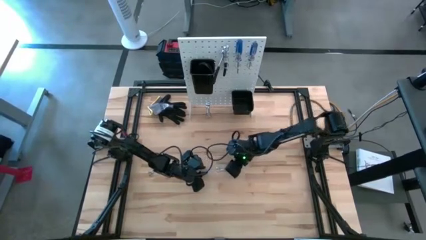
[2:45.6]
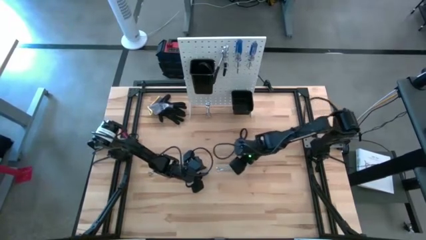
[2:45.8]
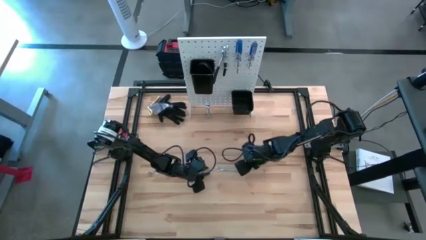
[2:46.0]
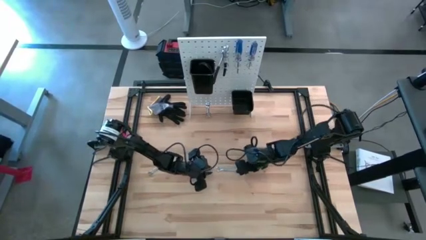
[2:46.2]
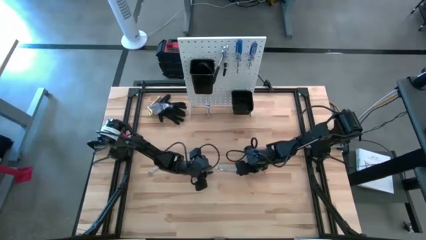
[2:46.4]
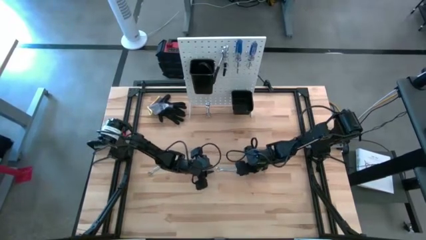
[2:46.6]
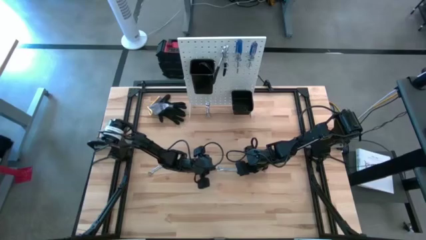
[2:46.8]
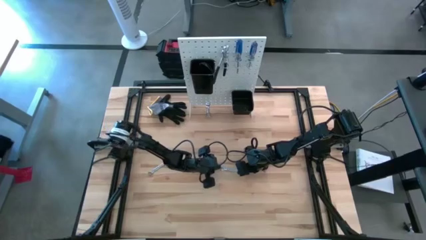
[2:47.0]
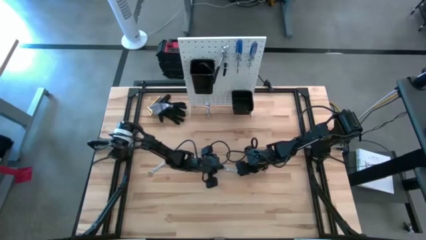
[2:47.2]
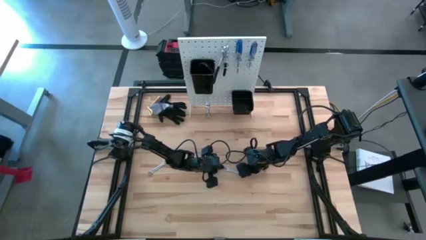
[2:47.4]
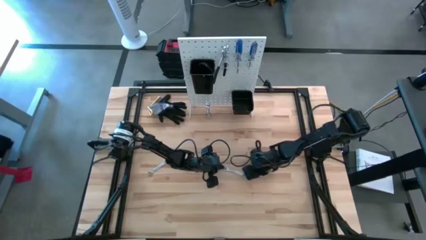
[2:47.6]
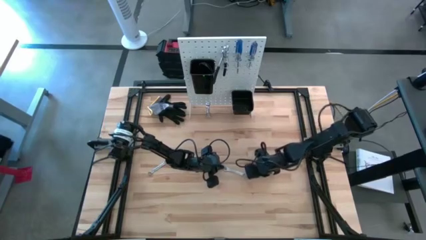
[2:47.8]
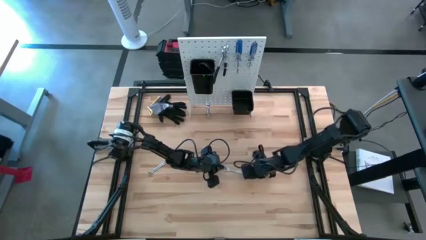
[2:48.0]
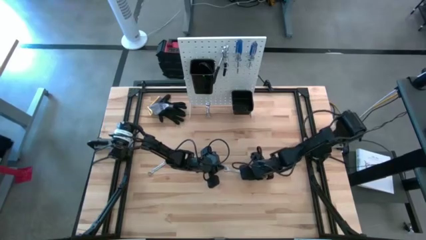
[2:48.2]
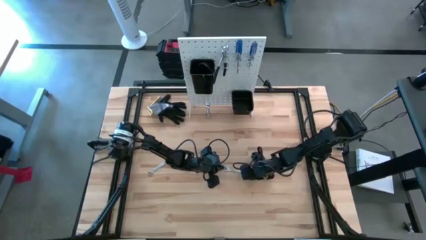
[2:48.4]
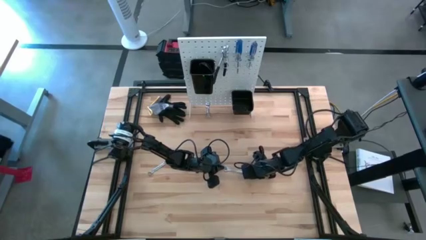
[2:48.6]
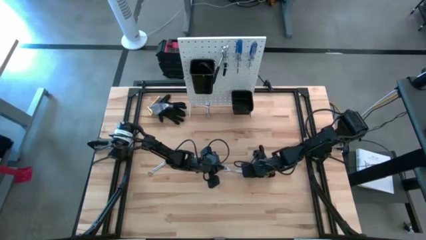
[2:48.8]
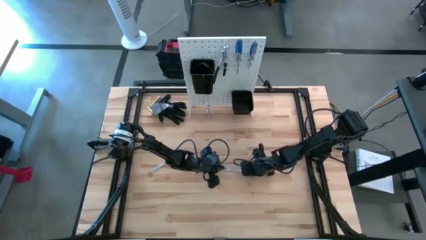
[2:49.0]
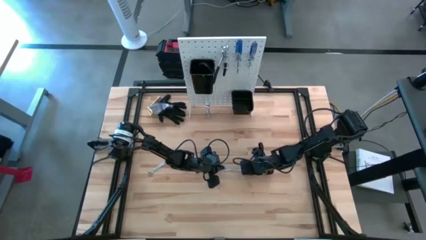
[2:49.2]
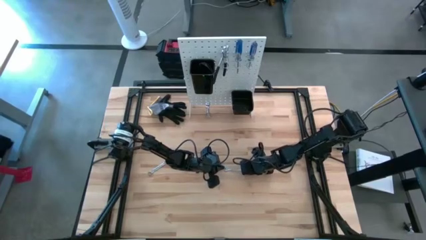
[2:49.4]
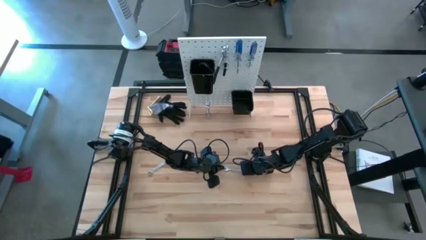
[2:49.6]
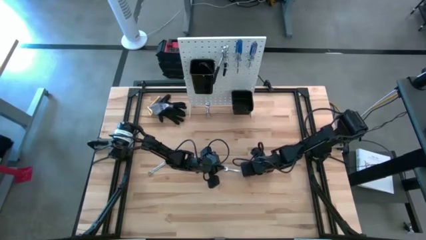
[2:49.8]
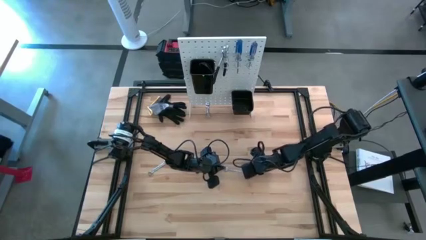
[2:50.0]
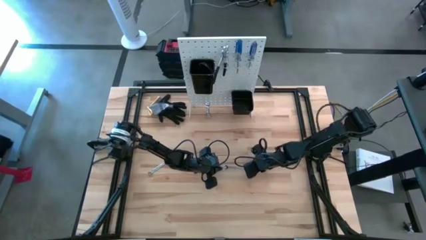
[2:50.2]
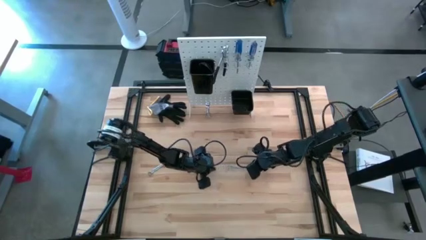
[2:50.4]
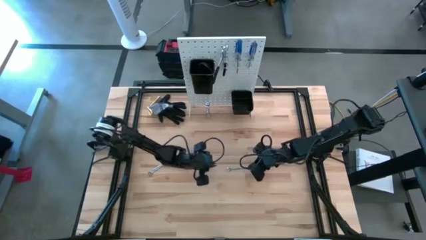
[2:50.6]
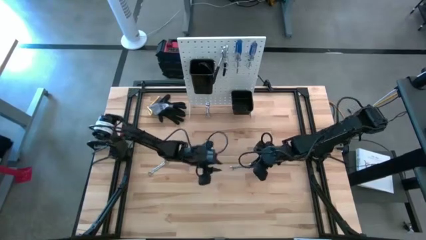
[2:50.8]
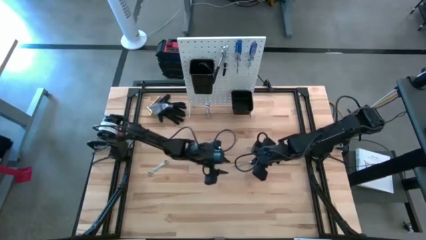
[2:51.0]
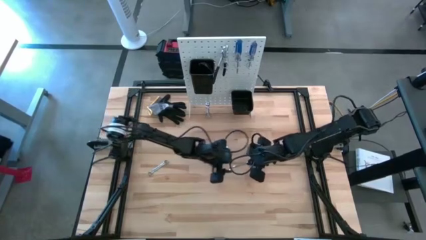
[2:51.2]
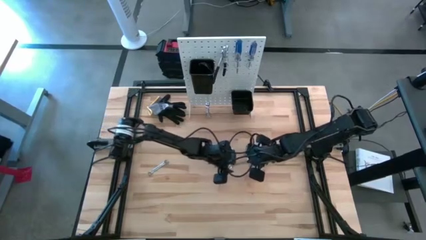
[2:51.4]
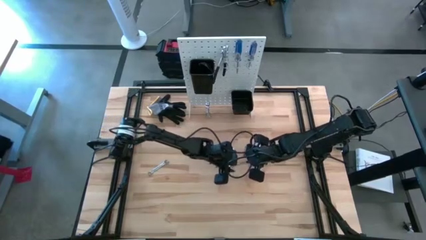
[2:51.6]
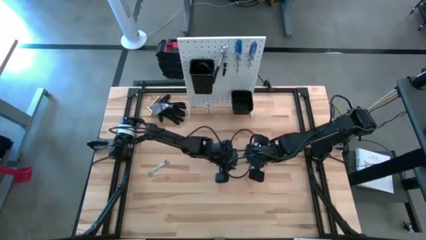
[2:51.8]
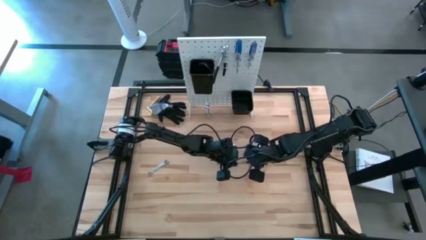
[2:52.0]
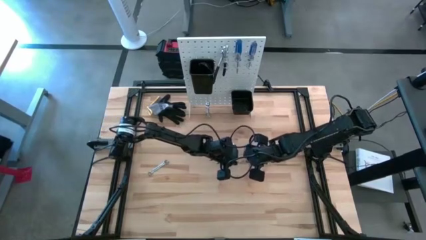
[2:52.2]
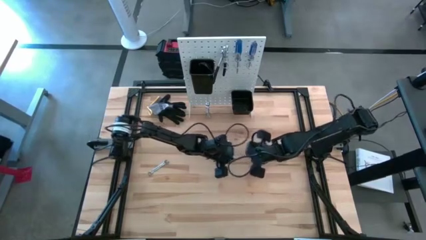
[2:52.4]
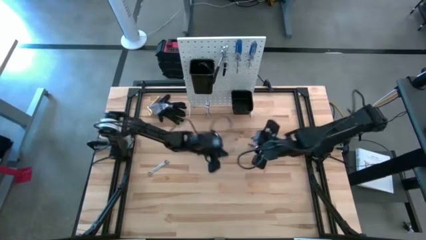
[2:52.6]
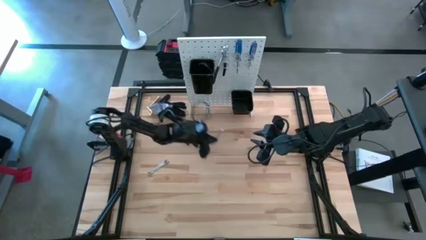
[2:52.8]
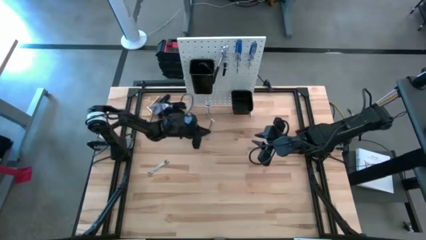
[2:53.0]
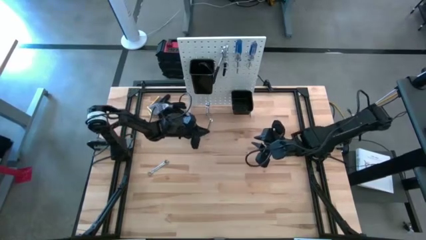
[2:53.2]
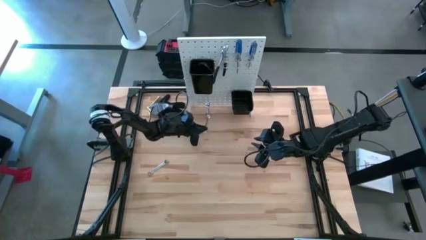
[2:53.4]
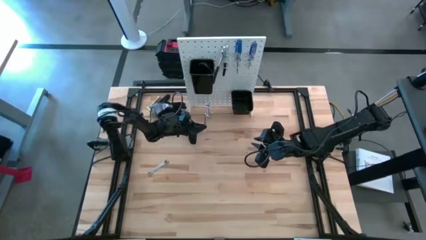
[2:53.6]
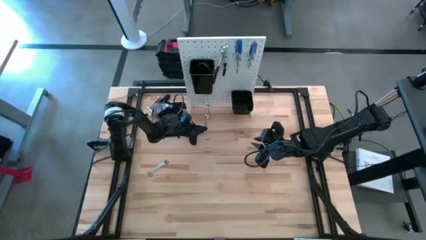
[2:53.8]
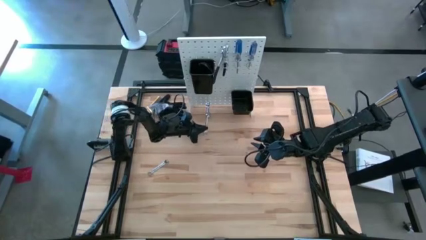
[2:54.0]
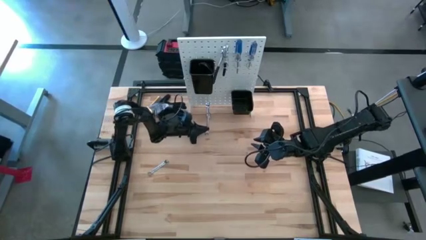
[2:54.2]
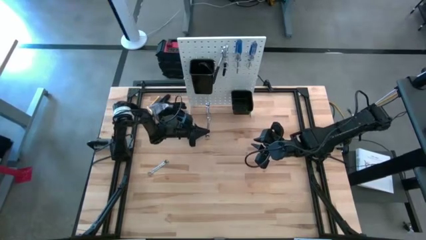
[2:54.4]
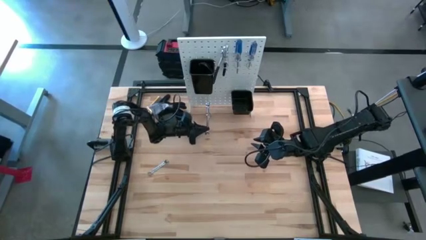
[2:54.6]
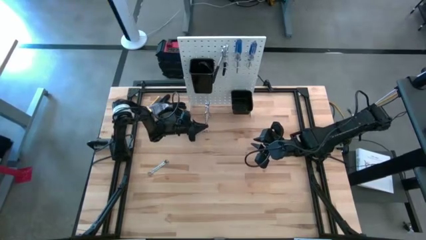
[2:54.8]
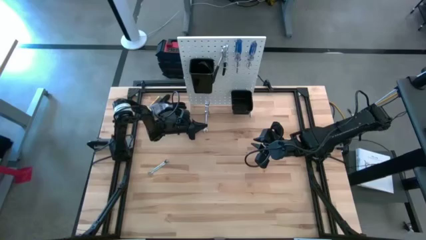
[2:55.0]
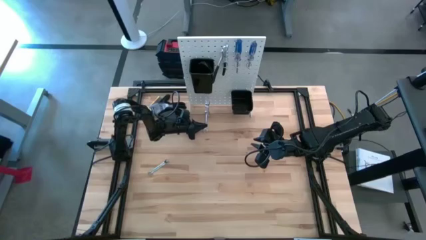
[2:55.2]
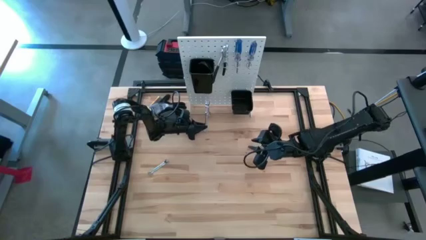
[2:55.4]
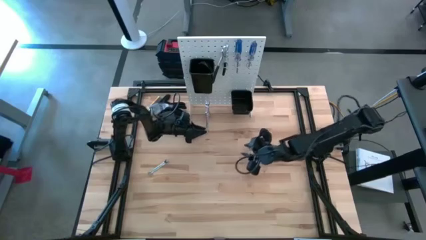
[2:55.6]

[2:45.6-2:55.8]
Task: Hang tools onto peg board
Hang the wrench on the peg board

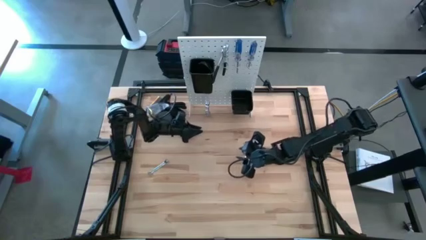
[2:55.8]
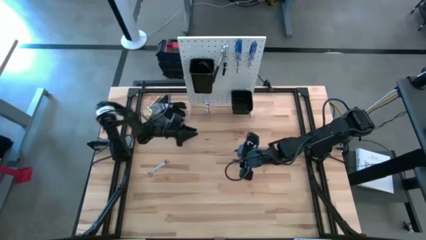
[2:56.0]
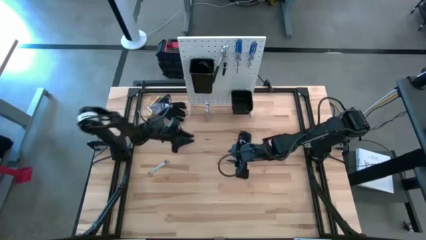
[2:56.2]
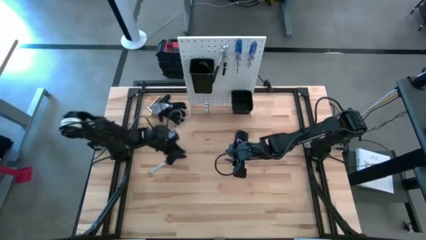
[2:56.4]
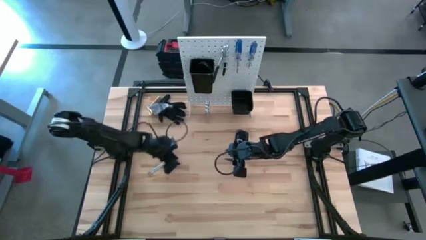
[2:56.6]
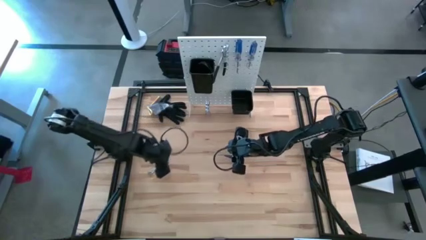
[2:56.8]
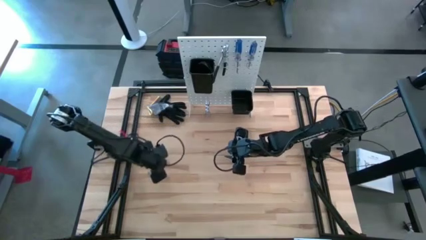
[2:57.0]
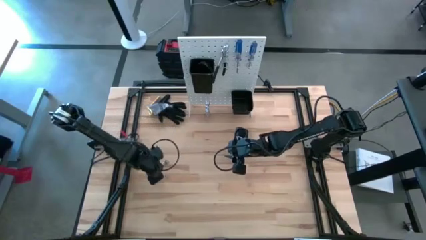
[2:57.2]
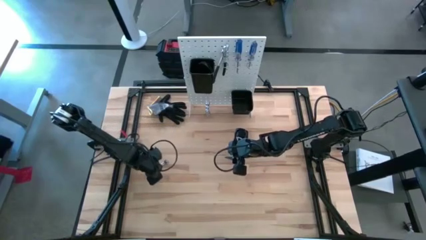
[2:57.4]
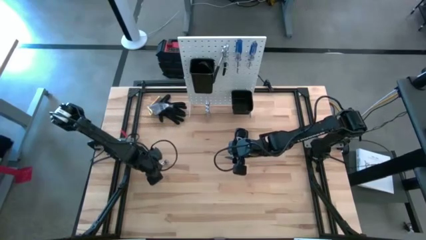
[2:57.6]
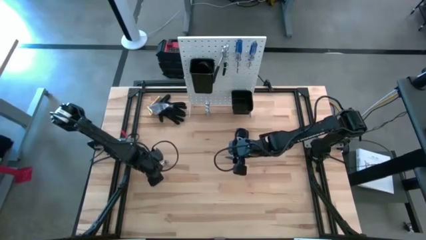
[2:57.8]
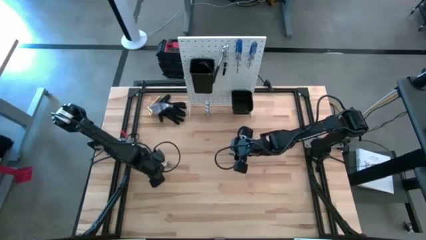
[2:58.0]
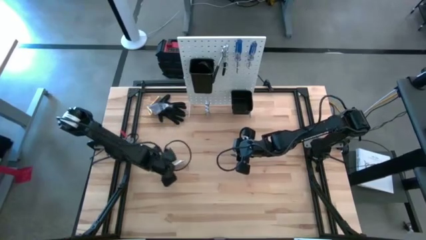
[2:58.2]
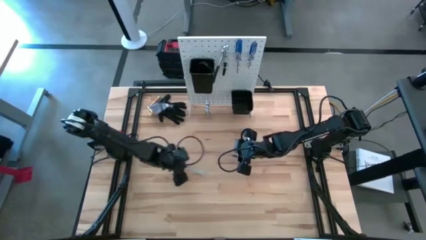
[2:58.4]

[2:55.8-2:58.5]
Hang the wrench on the peg board

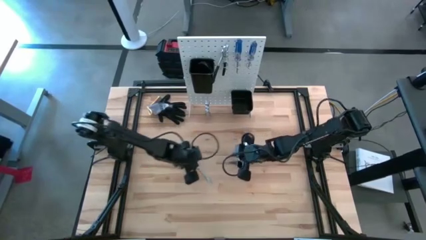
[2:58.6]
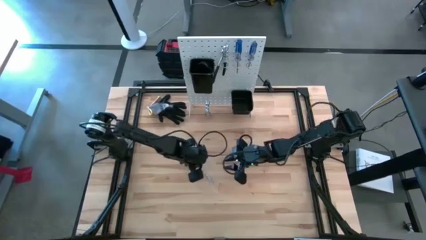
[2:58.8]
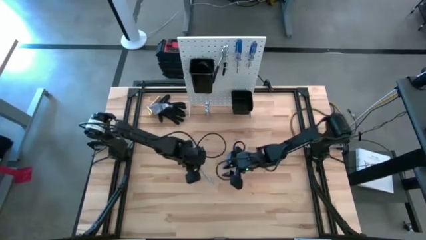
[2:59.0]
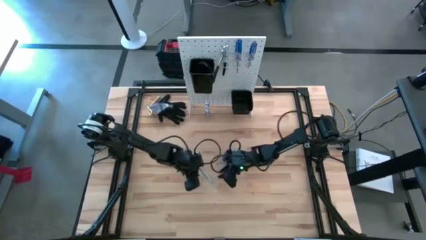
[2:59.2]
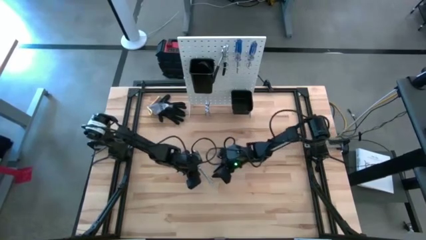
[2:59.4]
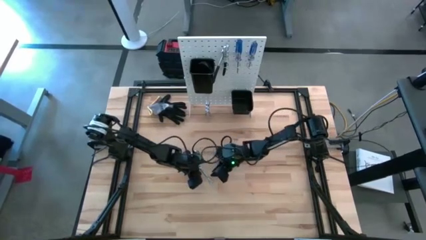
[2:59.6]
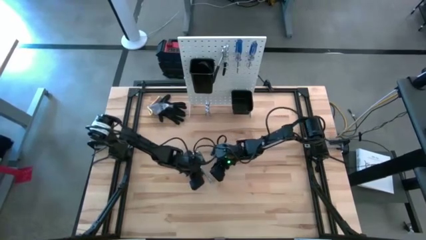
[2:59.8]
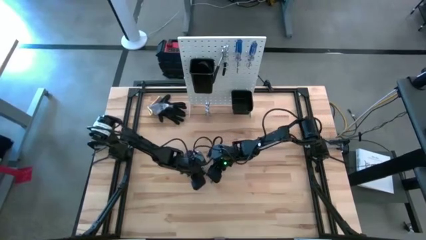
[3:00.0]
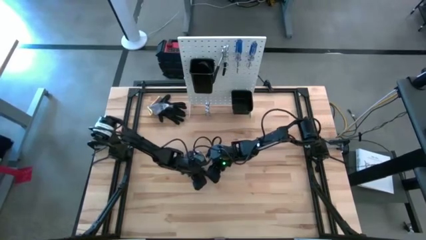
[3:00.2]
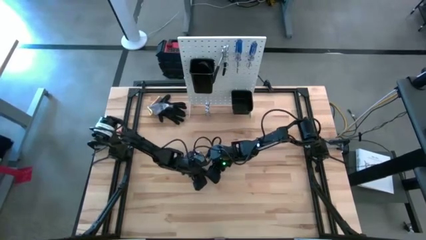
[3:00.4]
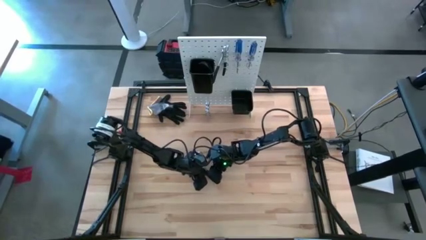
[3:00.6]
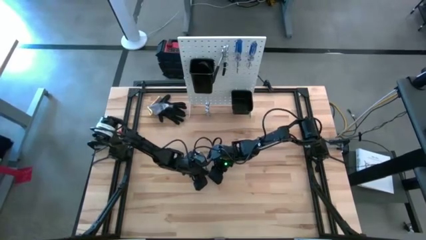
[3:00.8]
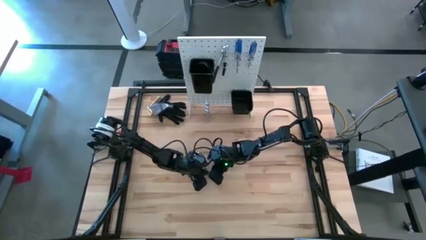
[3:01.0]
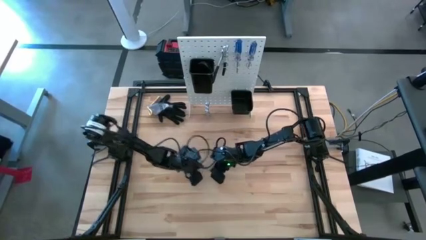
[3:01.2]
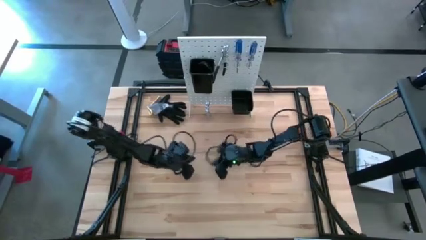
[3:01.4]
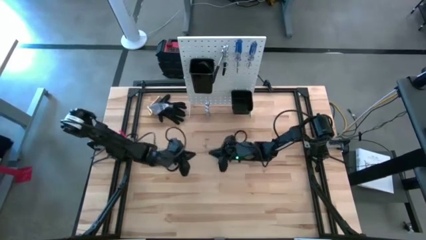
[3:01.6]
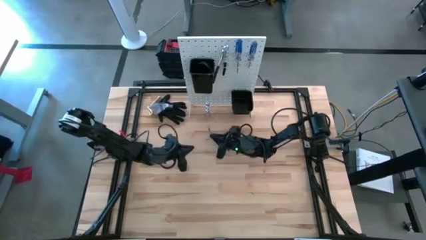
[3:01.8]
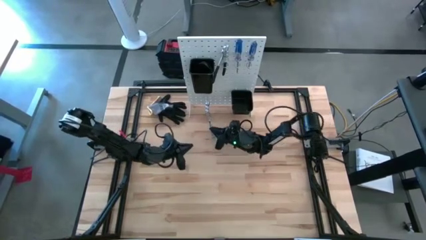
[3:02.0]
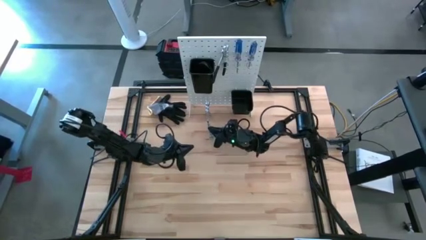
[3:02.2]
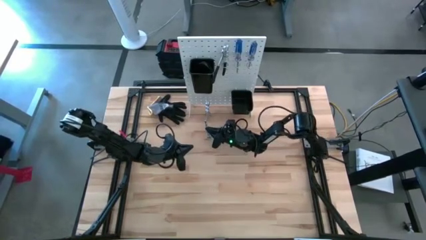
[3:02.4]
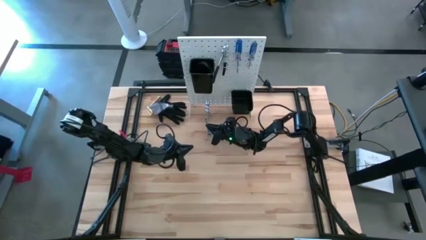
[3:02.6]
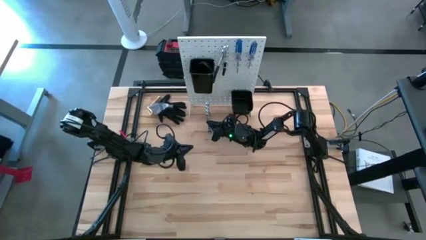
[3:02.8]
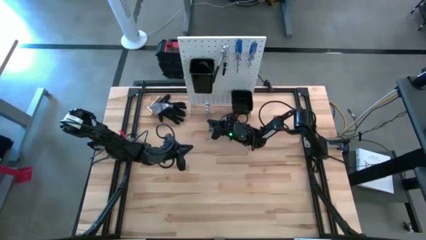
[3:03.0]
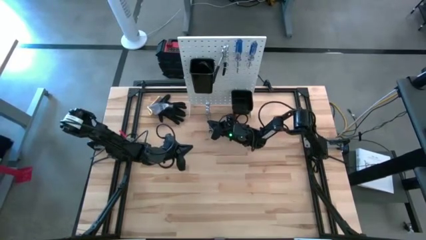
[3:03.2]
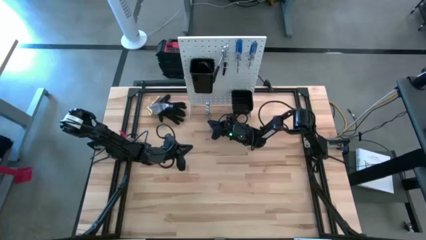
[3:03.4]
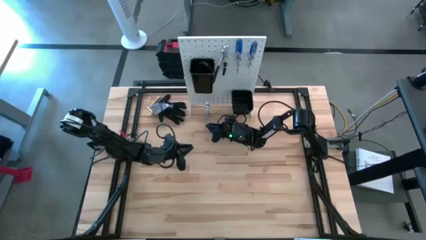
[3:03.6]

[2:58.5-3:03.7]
Hang the wrench on the peg board
